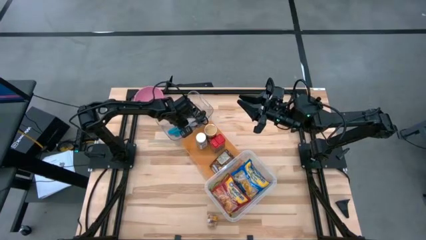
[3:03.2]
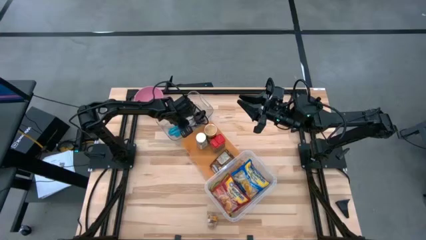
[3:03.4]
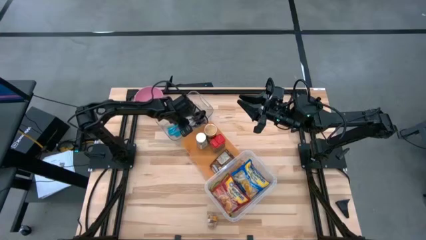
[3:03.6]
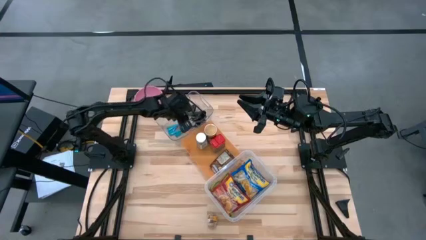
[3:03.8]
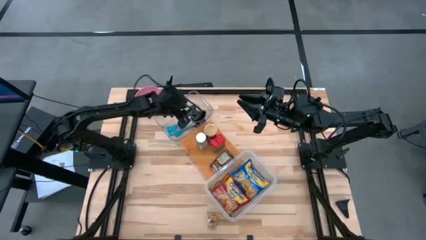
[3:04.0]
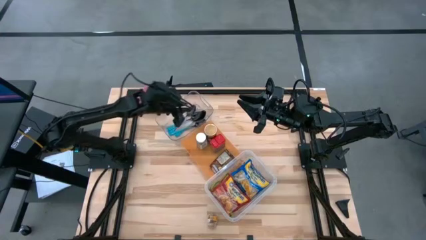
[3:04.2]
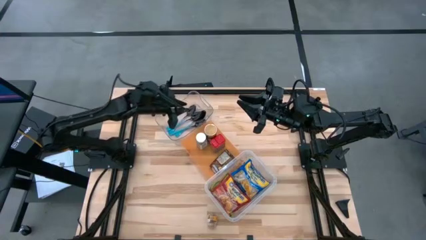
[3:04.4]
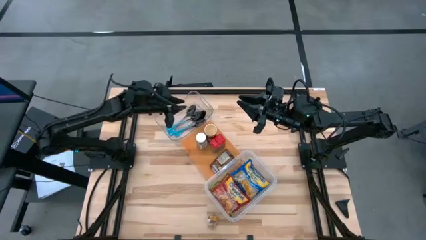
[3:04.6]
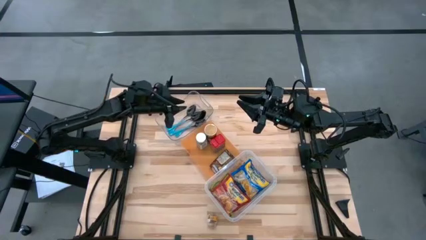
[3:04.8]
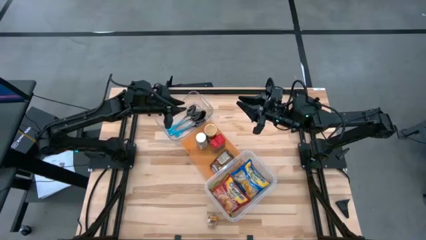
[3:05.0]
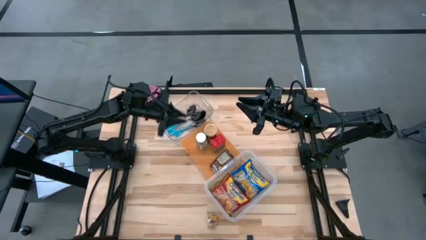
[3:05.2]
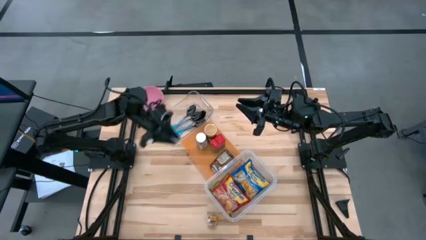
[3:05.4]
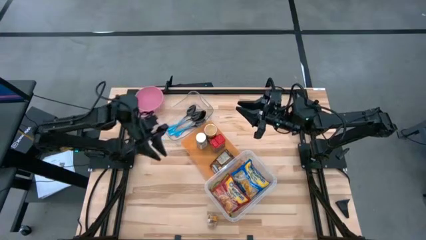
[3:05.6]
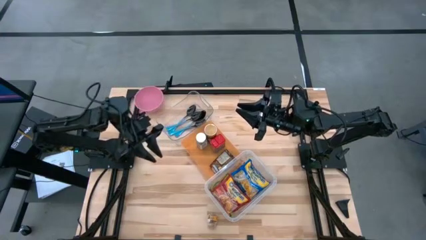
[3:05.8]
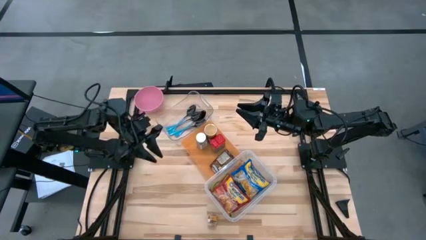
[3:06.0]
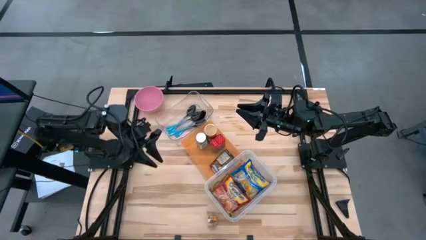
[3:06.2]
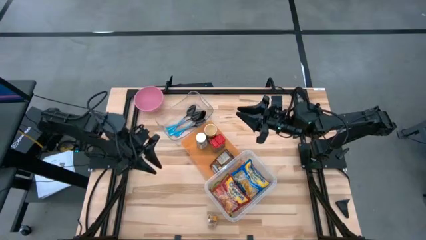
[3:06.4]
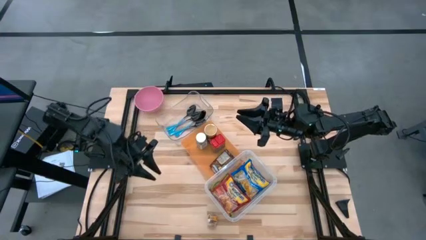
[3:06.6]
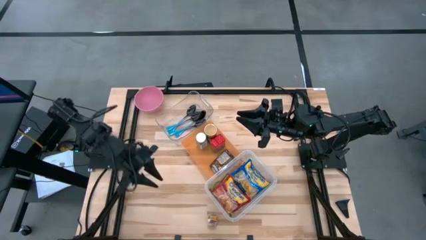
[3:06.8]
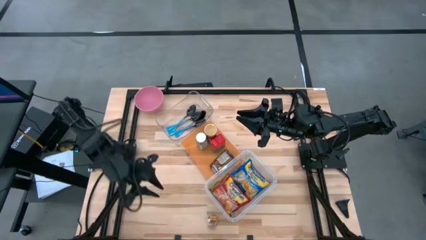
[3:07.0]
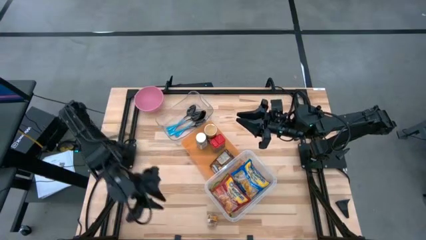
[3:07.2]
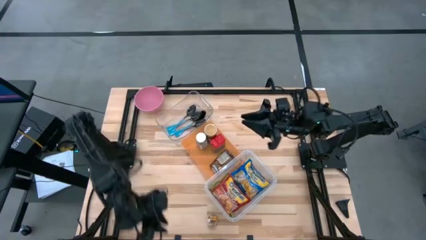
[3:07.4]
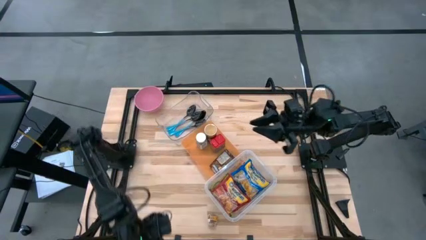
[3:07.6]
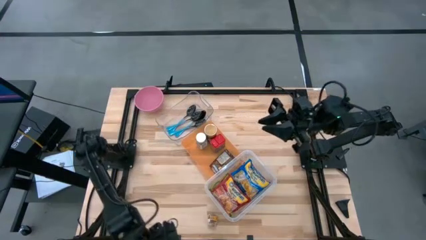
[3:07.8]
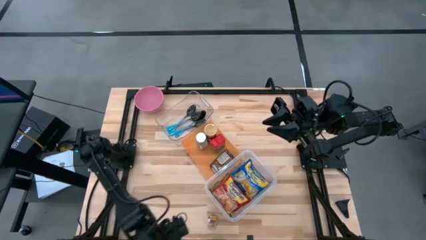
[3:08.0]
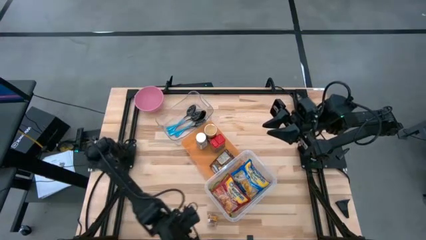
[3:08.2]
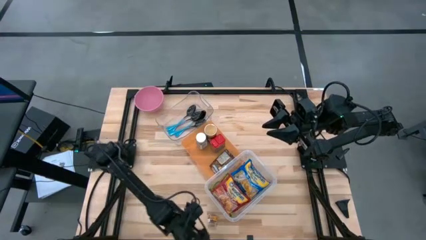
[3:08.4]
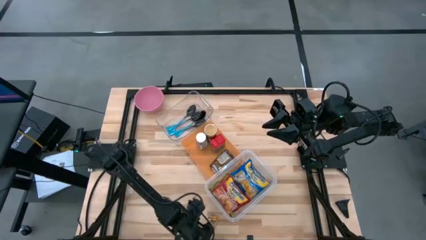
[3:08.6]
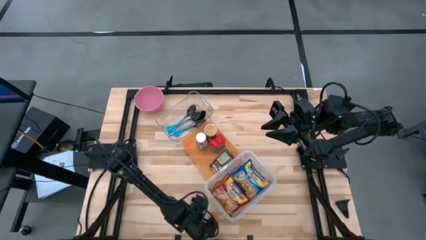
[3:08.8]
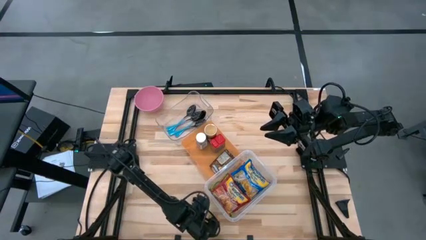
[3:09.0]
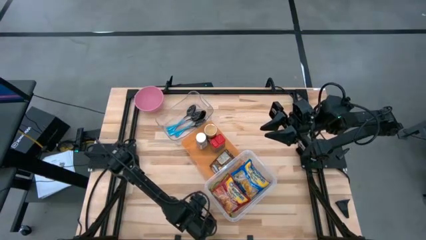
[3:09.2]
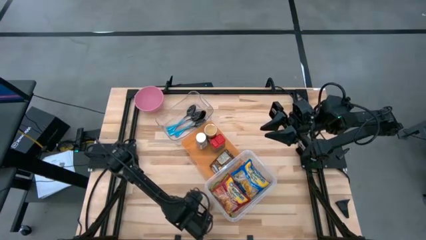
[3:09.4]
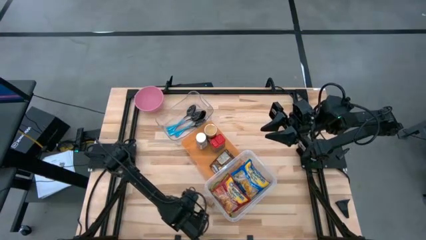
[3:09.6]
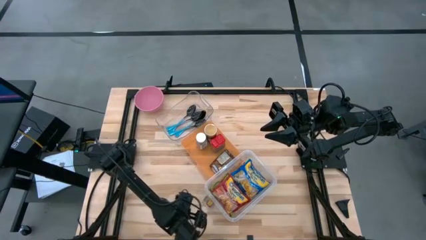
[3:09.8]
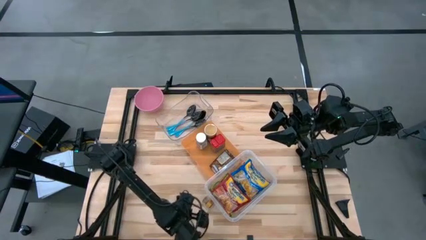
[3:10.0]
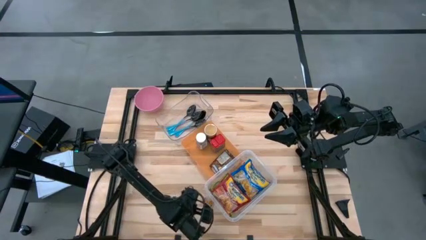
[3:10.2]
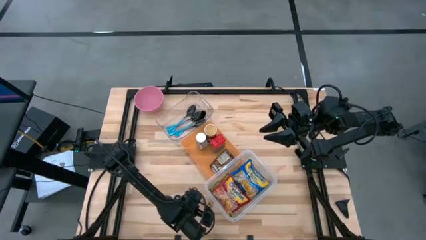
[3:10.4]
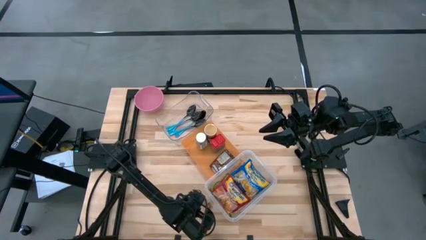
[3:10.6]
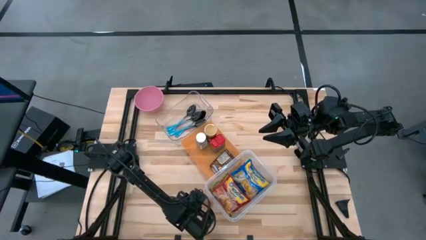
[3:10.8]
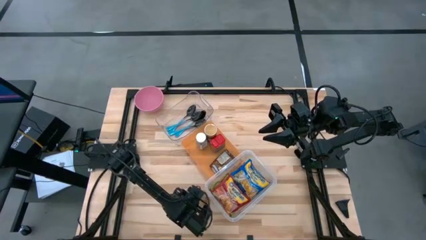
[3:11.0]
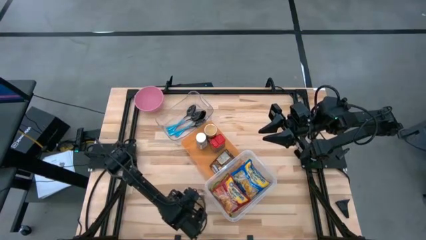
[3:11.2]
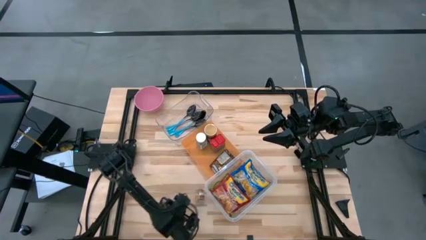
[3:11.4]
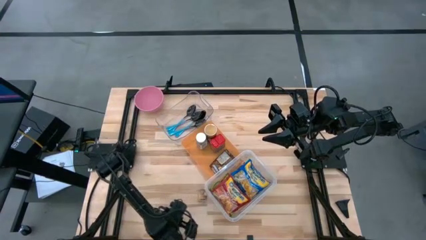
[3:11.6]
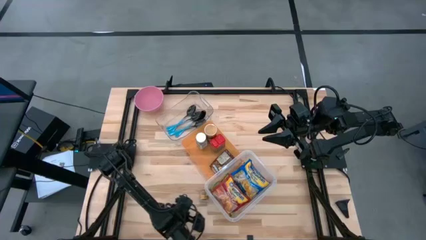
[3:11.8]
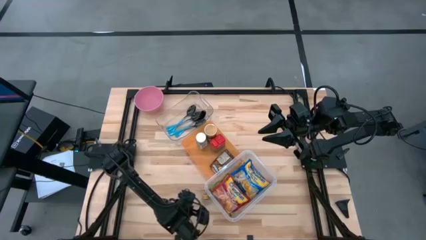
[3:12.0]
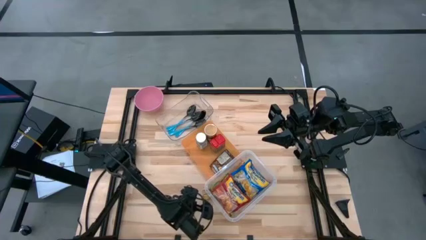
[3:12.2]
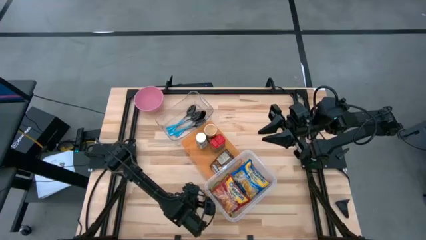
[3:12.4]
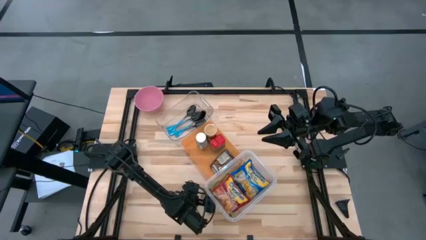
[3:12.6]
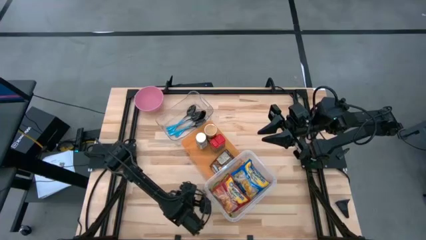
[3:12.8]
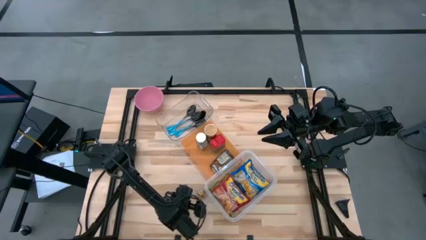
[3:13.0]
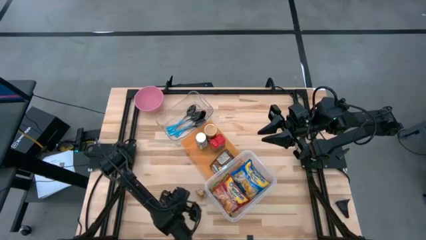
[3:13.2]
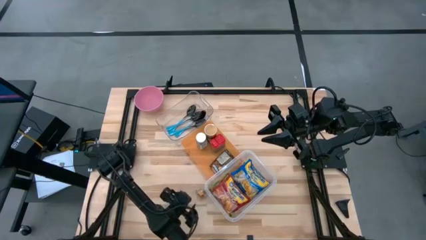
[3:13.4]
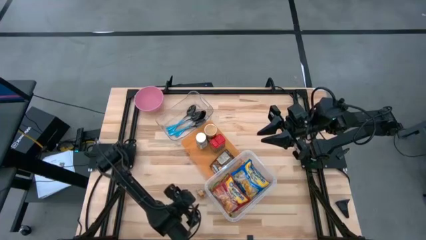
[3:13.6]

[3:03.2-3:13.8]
Task: Pick & Place Food Item
Put the brown seasoning bottle into the orange bin

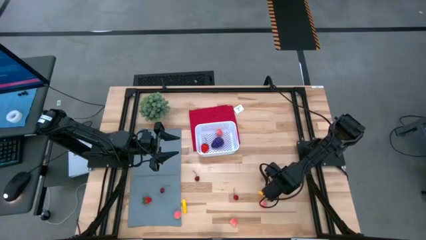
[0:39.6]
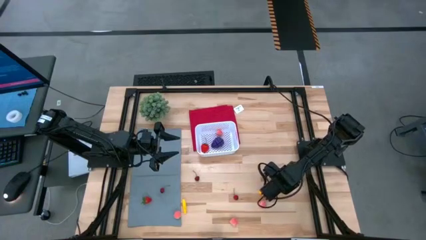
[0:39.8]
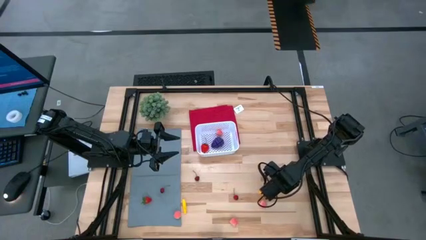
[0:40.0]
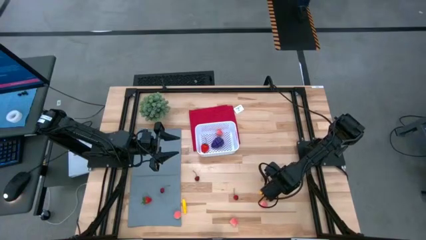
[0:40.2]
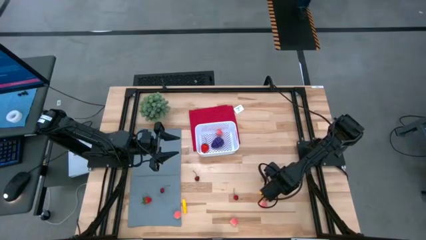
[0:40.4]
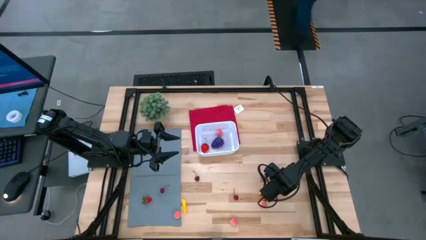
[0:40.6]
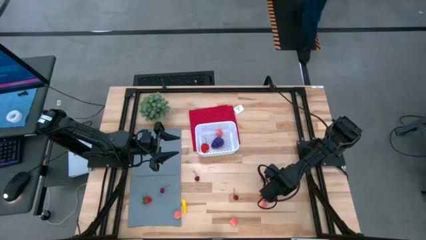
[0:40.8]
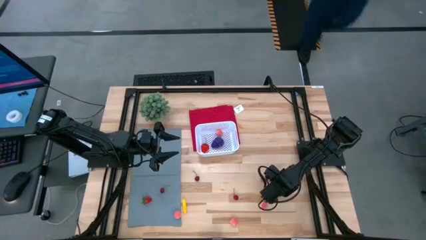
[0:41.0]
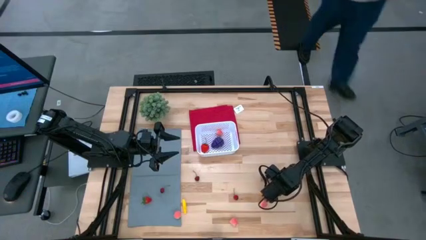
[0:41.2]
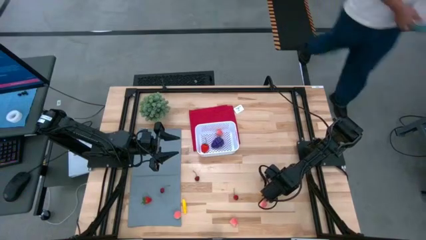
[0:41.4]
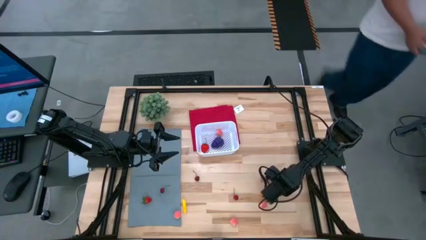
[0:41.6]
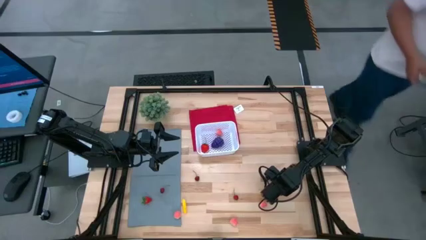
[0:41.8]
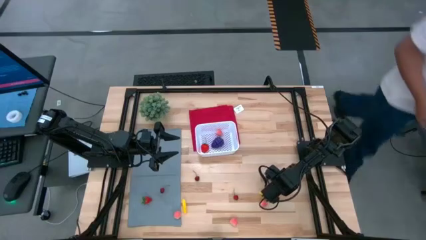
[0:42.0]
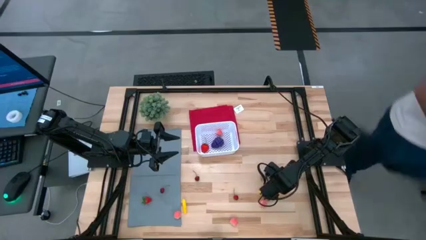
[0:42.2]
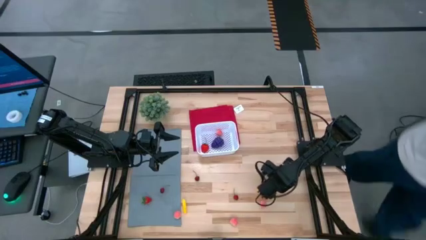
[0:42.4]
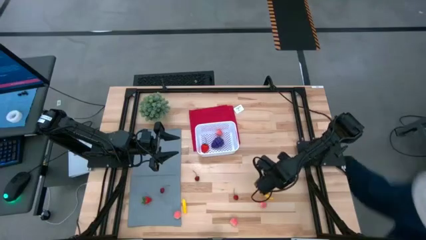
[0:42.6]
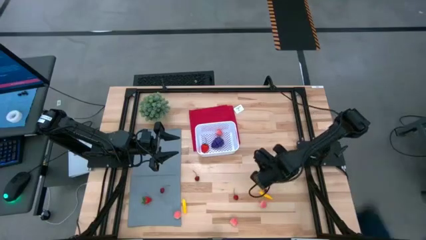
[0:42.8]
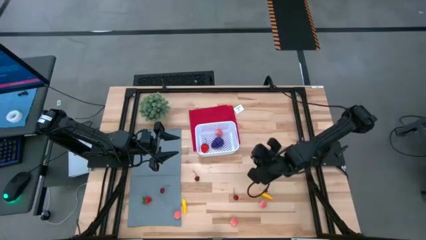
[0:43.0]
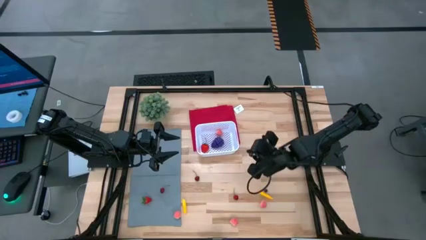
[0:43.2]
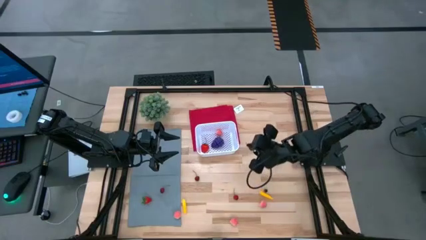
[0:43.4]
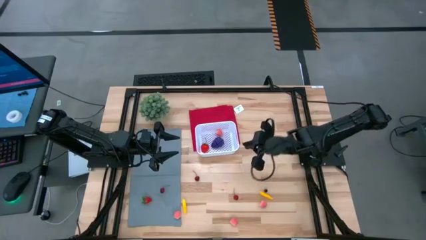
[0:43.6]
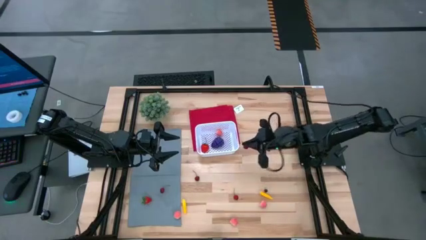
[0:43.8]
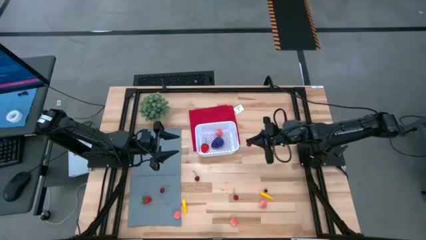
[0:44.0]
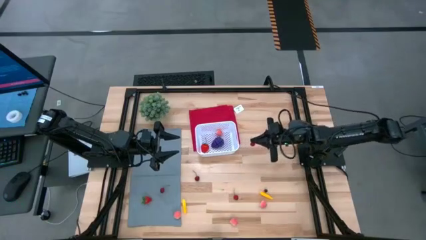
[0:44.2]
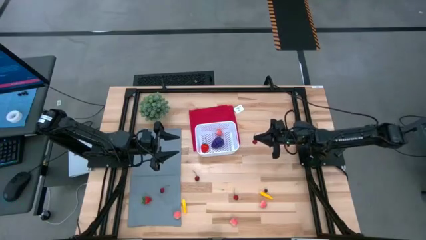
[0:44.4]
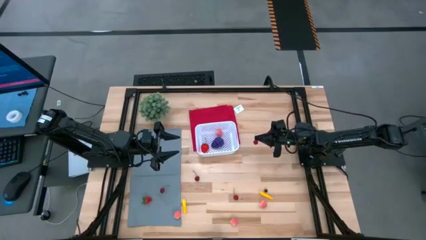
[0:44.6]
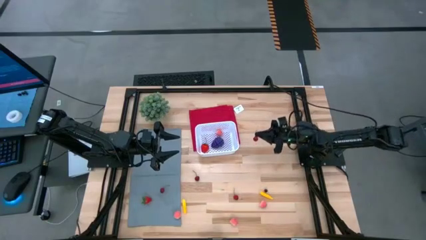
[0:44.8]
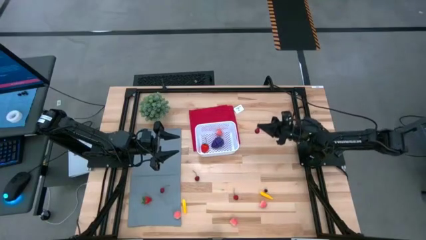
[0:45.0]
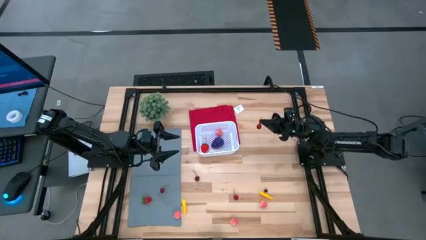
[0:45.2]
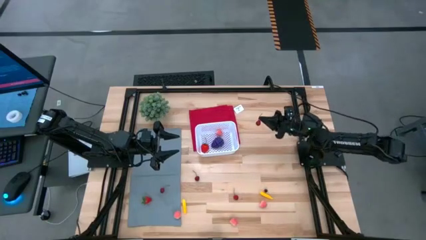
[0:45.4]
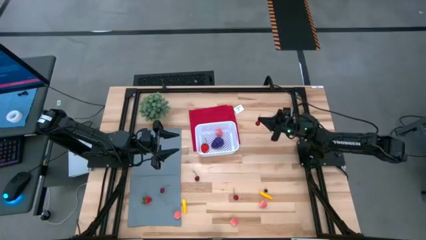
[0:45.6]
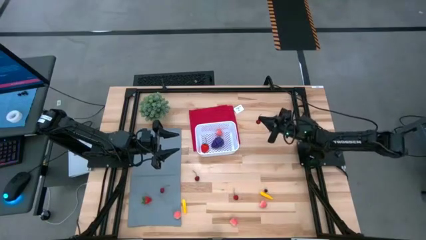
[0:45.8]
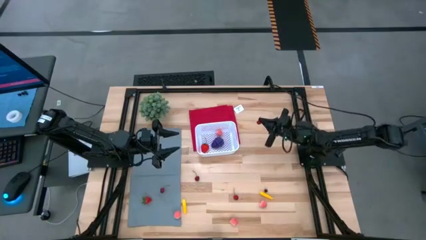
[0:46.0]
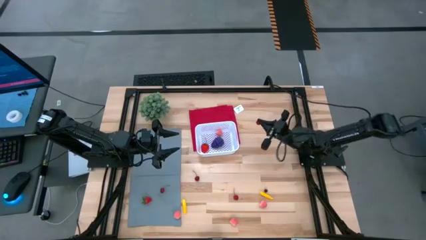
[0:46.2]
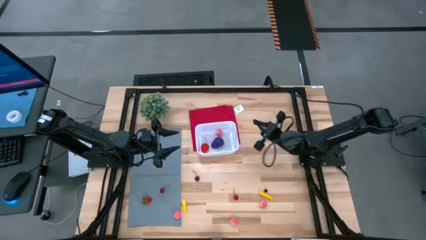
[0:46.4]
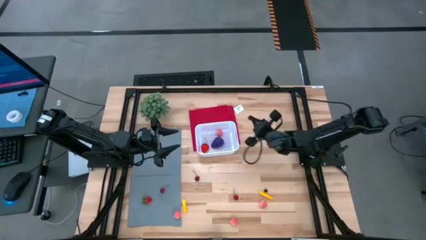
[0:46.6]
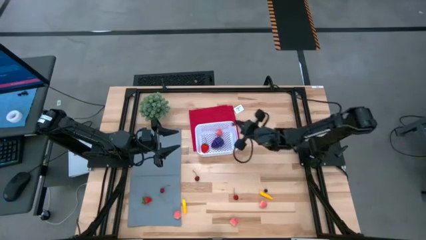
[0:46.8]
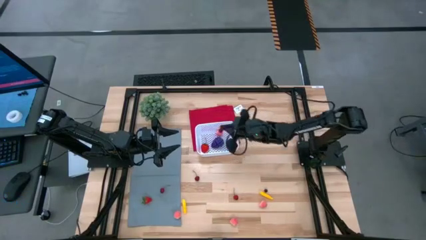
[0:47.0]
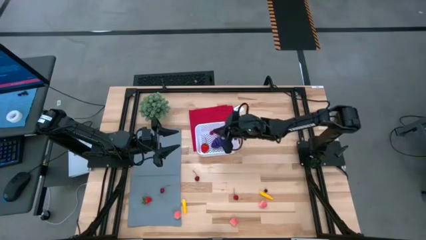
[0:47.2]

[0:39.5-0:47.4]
Task: Pick and placing Produce into tupperware
Put the red cherry into the white bin
